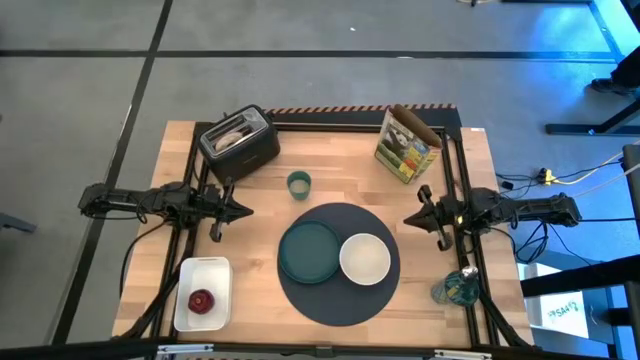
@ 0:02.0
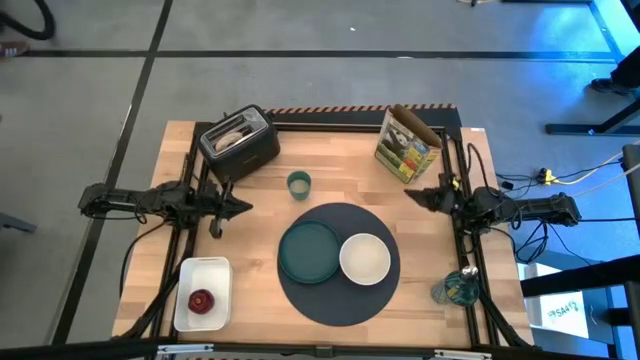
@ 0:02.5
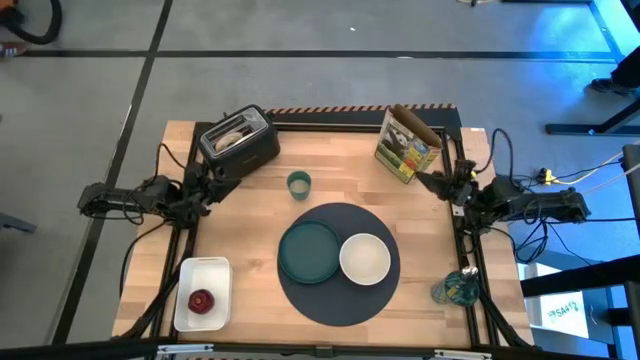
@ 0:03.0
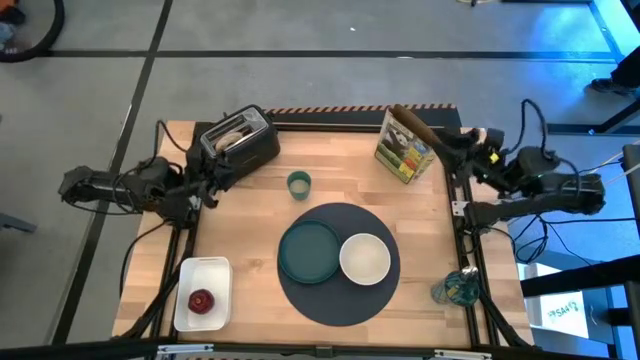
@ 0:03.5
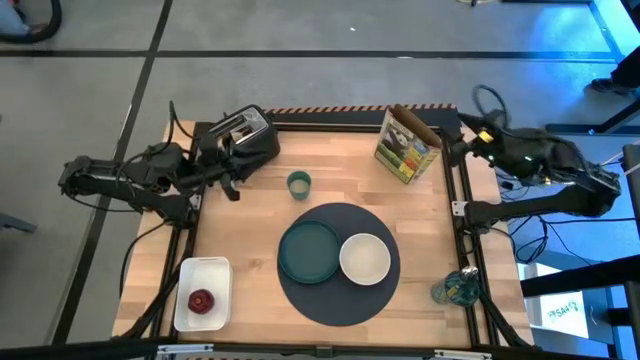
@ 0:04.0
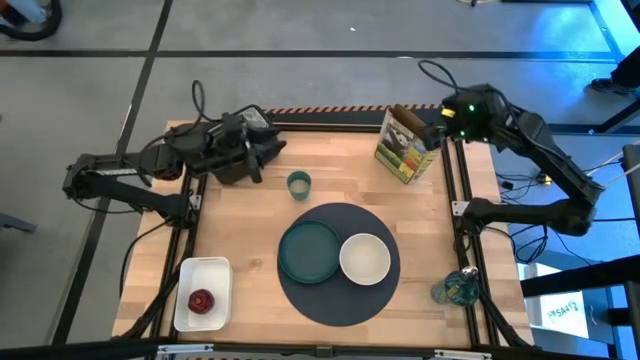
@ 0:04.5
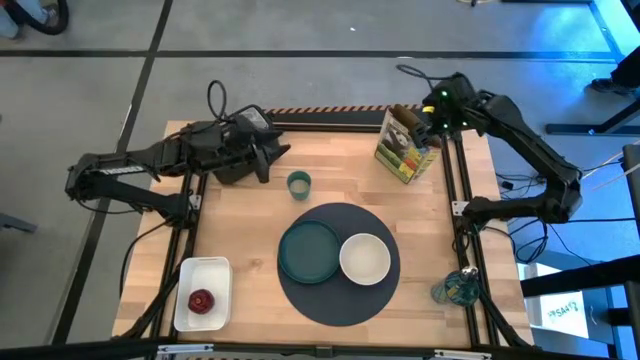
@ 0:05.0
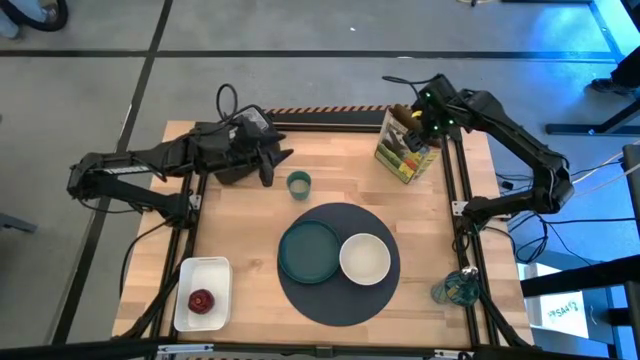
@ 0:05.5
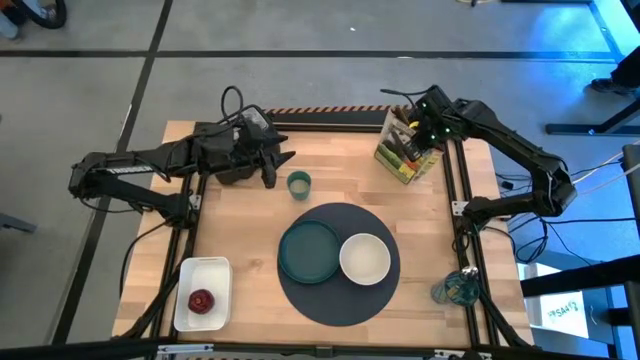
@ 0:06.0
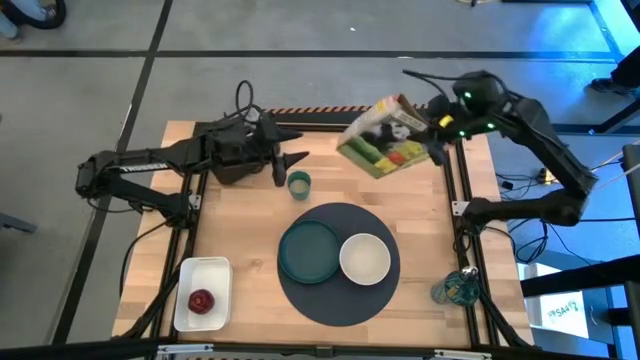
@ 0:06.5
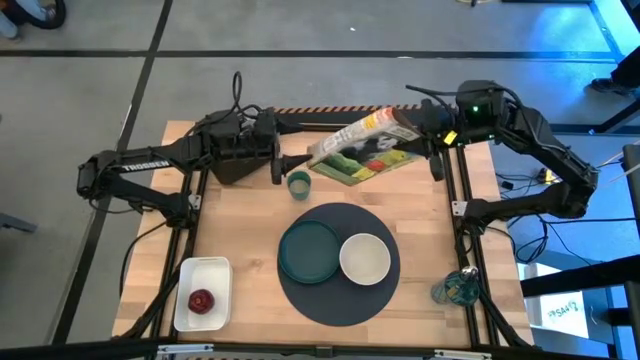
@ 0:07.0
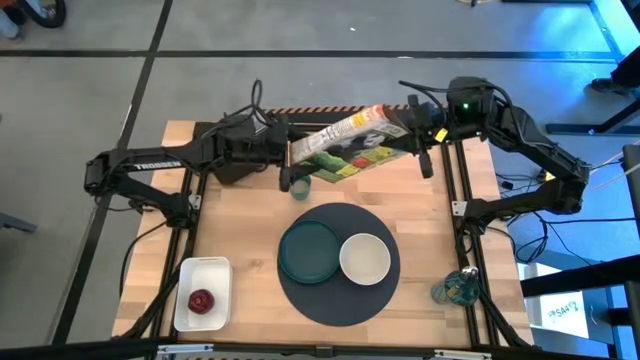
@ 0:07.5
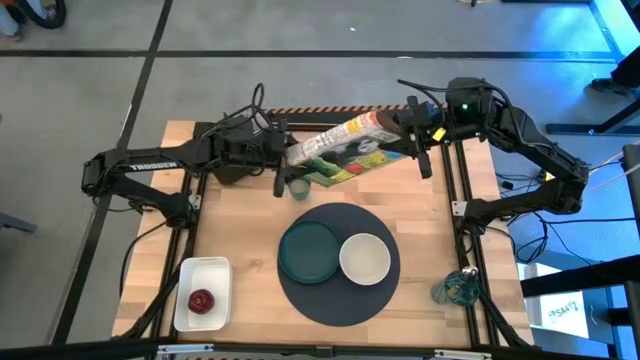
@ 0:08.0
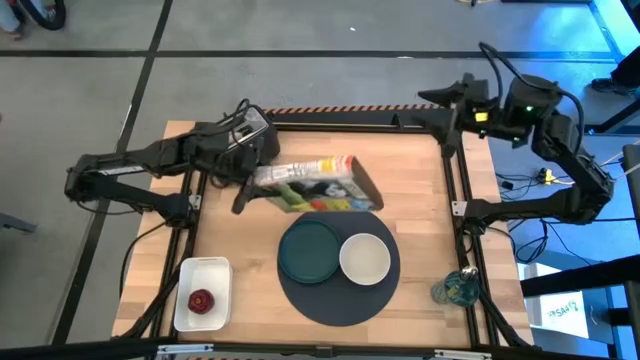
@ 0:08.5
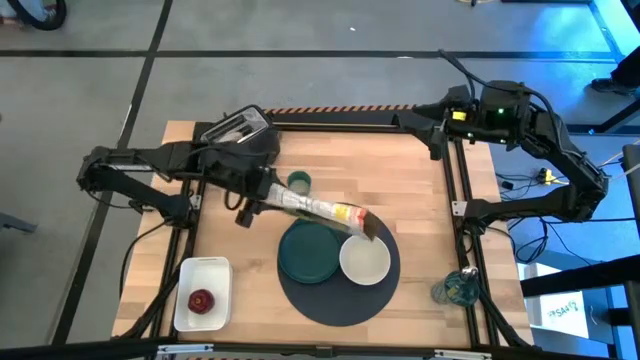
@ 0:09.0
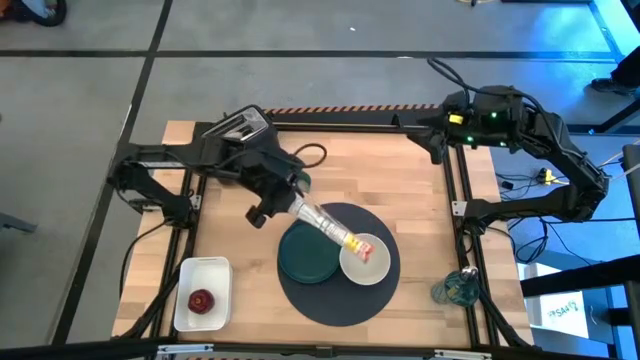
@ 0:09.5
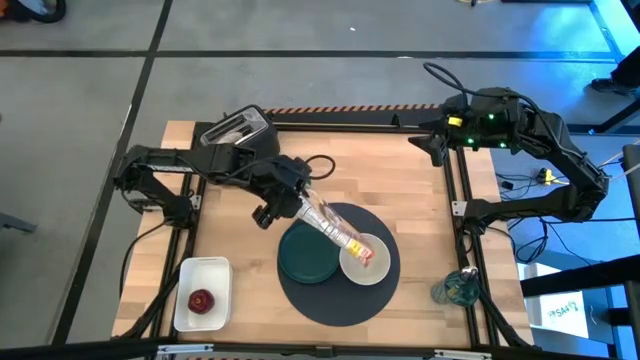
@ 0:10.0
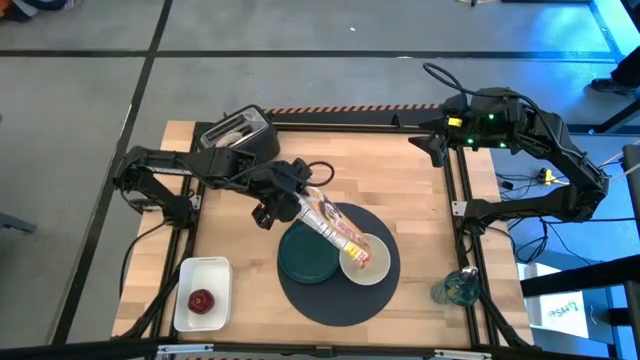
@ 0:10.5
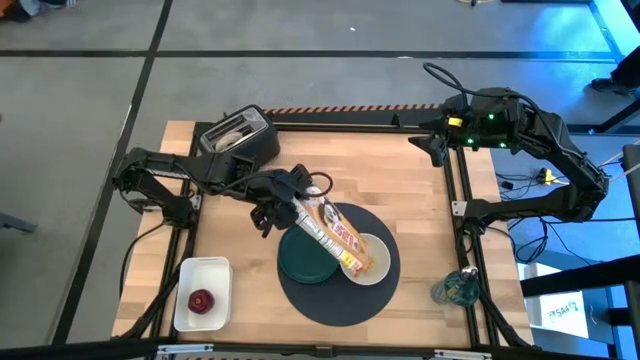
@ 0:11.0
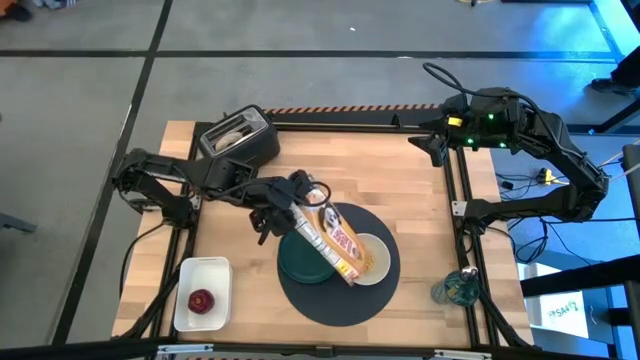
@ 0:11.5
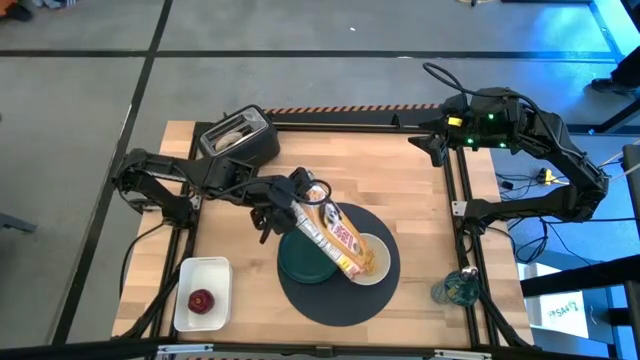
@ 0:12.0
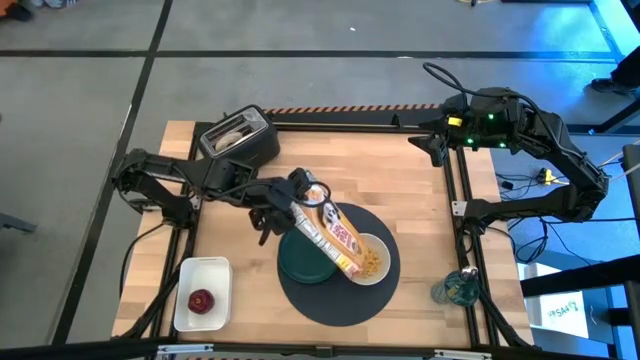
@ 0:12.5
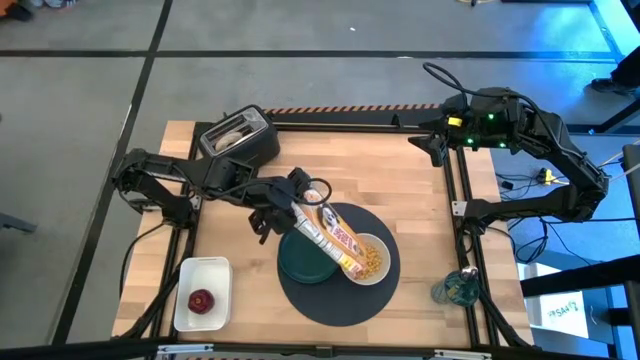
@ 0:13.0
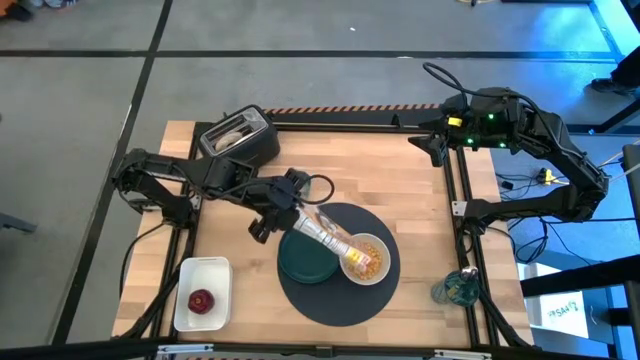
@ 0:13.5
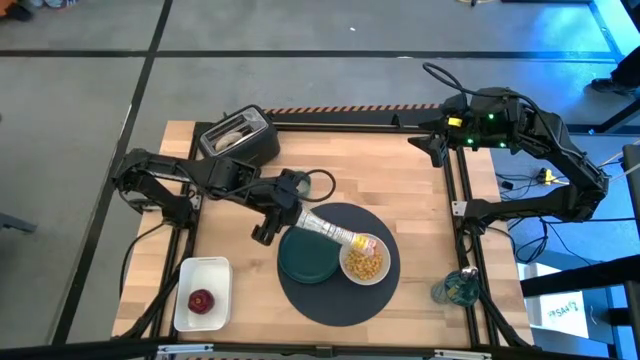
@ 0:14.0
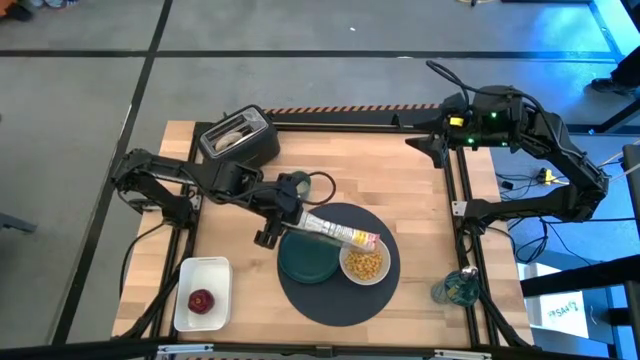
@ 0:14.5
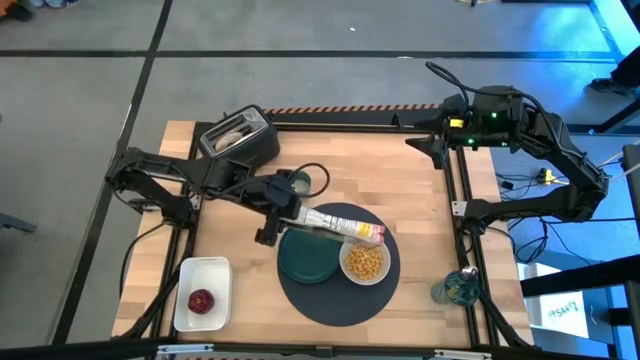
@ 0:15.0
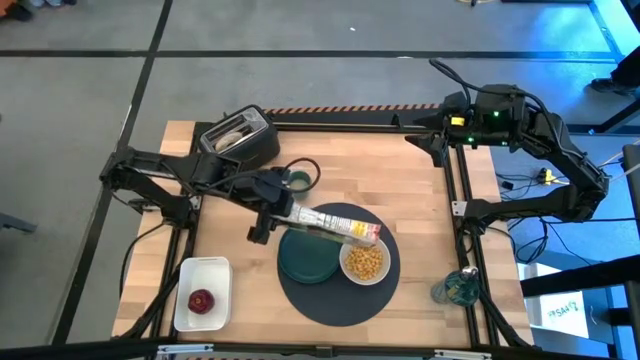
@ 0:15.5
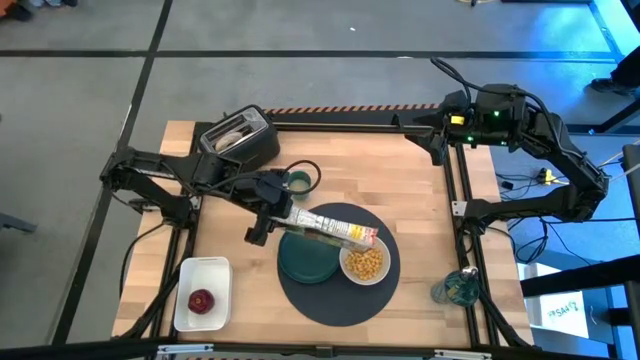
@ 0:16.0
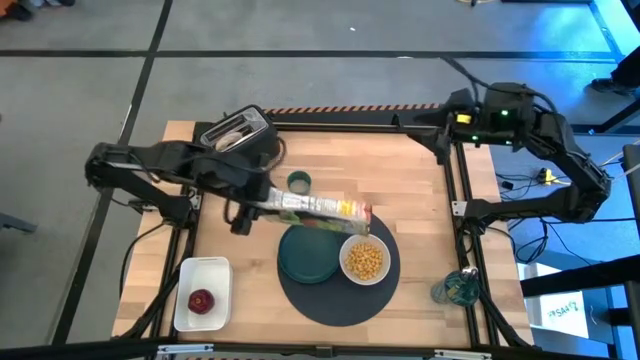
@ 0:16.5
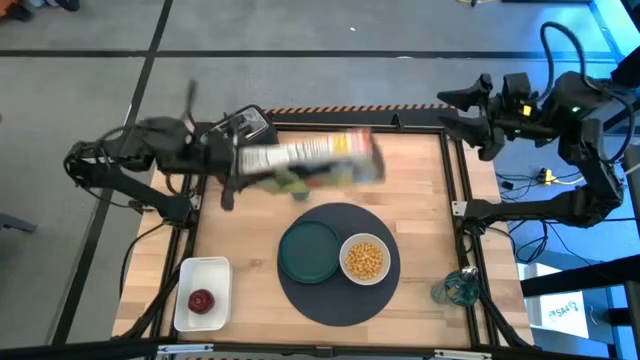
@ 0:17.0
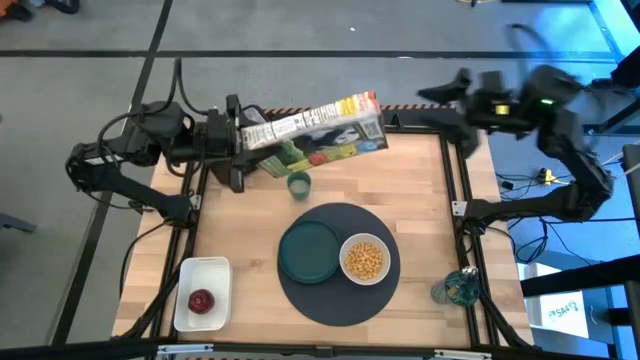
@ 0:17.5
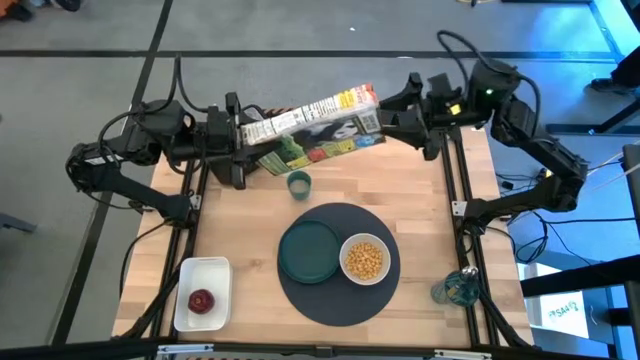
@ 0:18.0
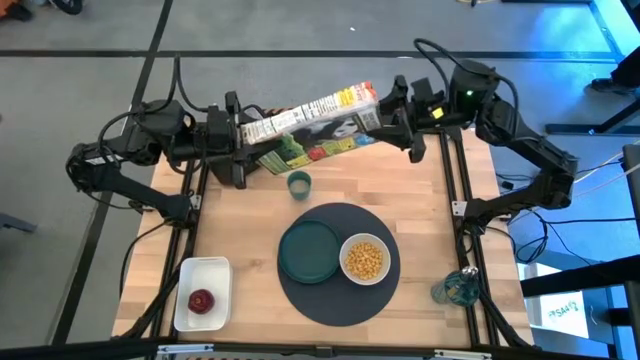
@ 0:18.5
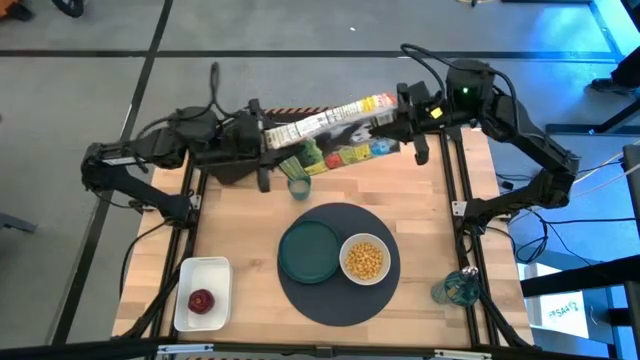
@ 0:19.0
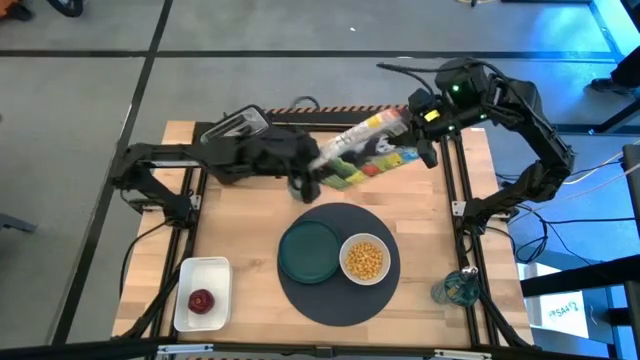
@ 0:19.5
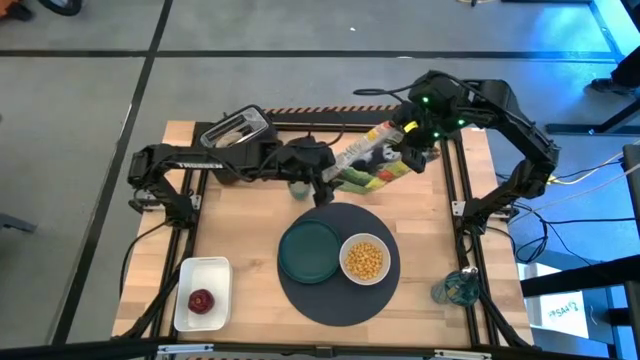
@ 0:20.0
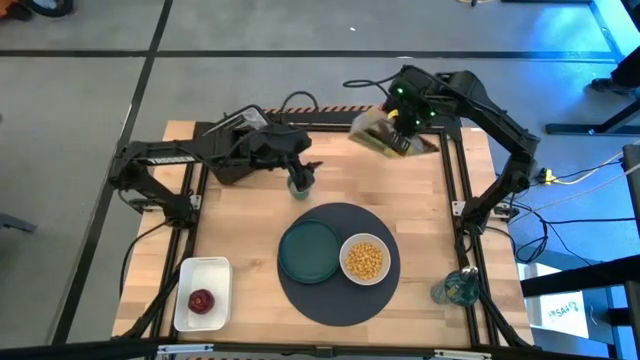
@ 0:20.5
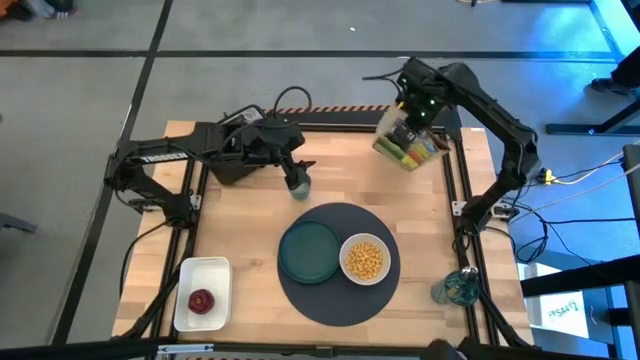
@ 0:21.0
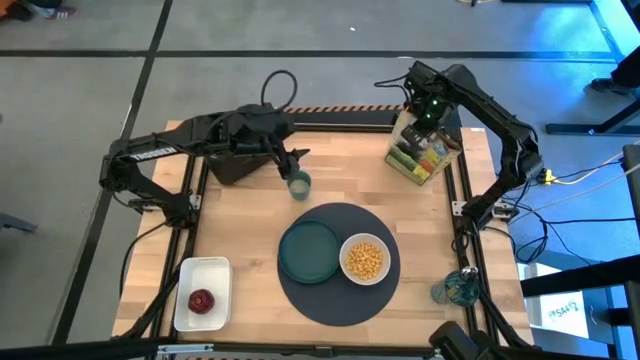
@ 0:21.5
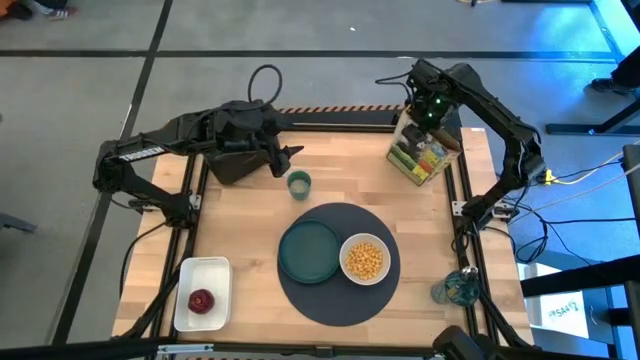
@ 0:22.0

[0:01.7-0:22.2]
Task: Arrange a breakfast setting
Pour the cereal from the cereal box into the white bowl
